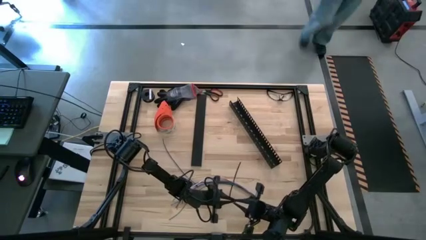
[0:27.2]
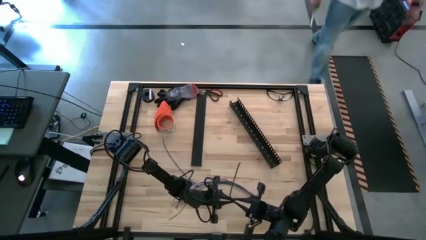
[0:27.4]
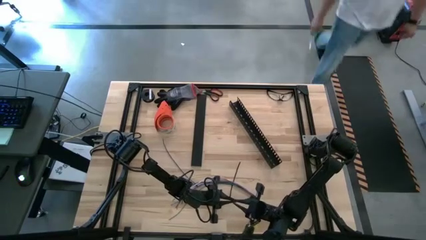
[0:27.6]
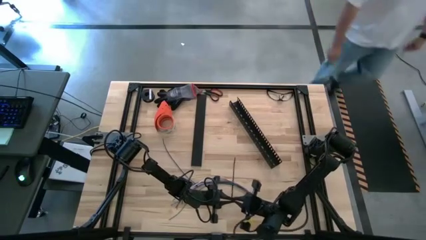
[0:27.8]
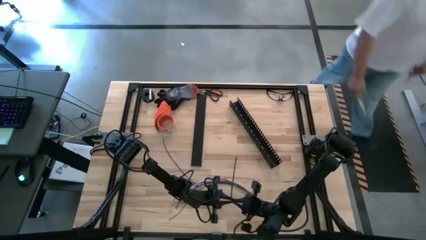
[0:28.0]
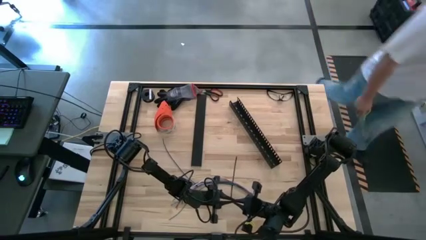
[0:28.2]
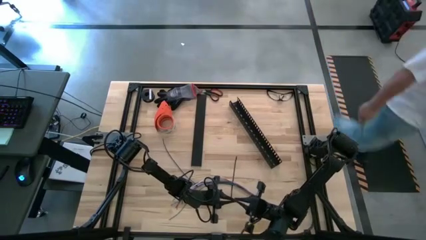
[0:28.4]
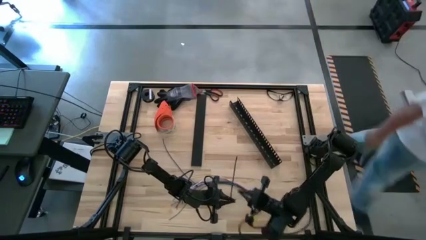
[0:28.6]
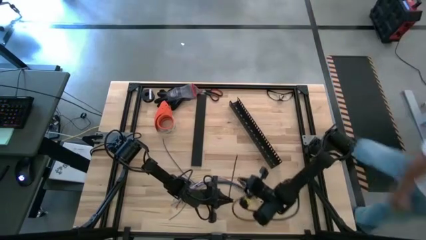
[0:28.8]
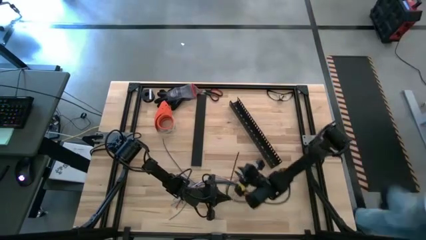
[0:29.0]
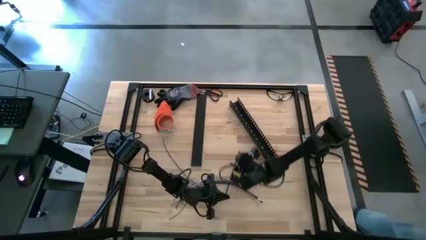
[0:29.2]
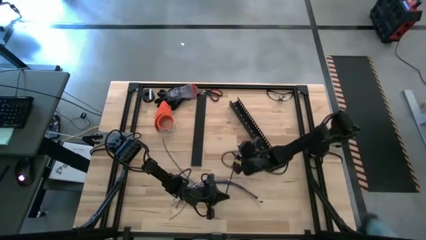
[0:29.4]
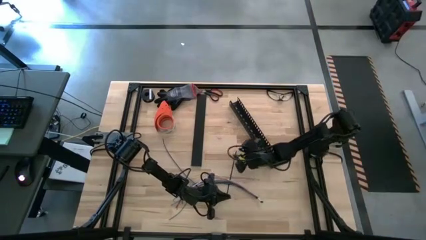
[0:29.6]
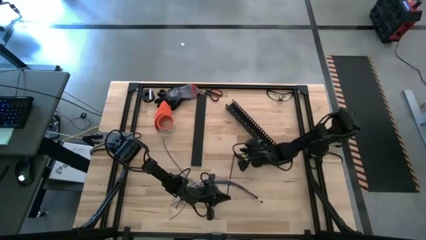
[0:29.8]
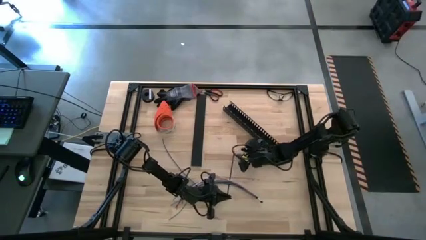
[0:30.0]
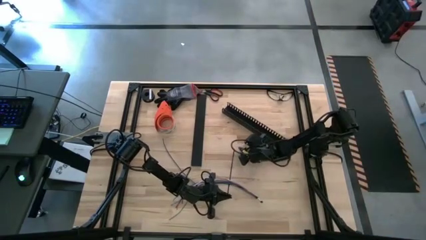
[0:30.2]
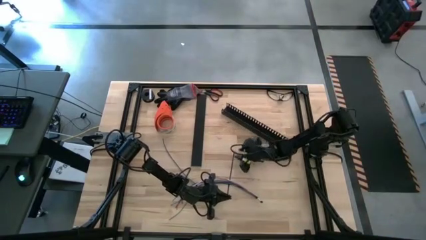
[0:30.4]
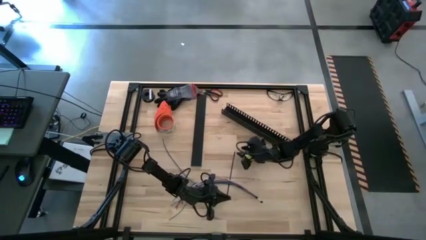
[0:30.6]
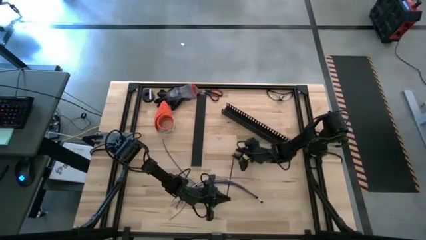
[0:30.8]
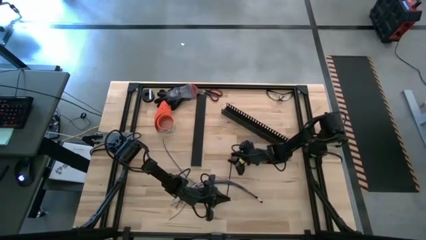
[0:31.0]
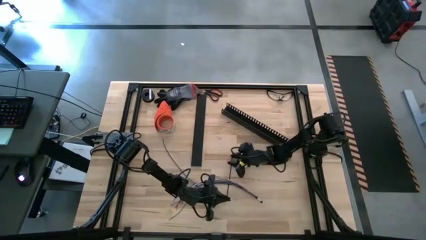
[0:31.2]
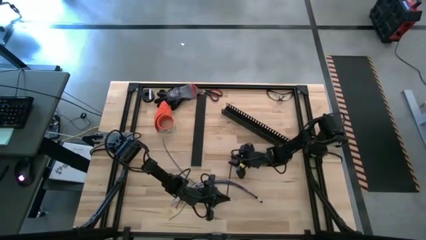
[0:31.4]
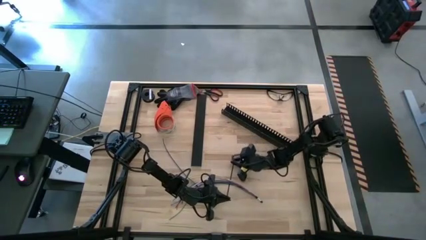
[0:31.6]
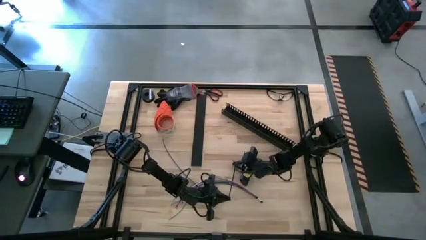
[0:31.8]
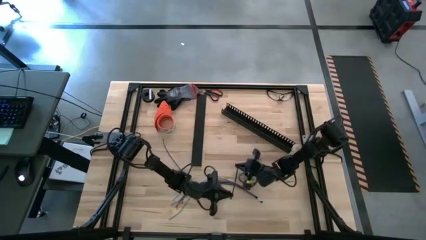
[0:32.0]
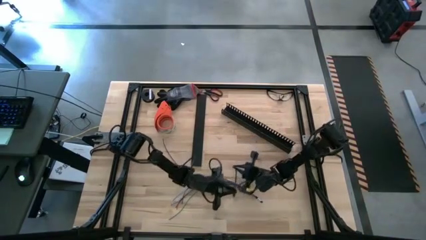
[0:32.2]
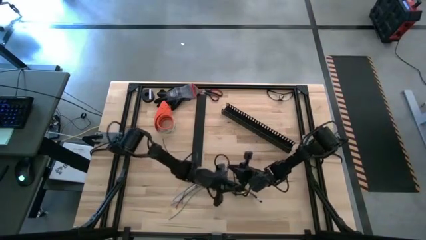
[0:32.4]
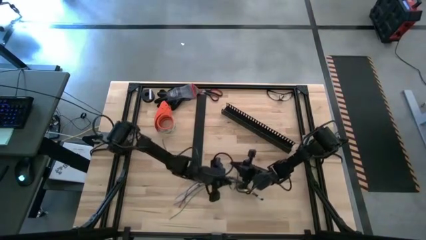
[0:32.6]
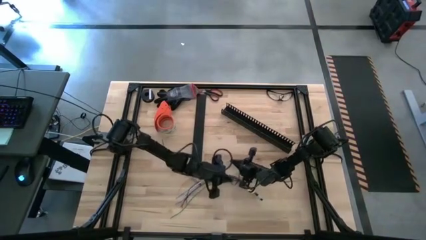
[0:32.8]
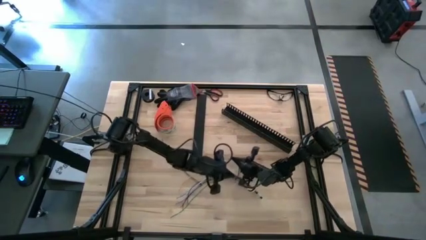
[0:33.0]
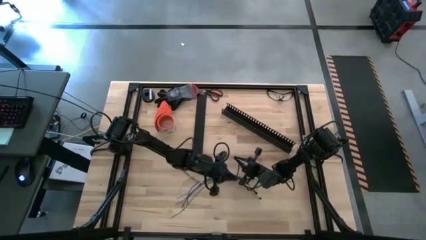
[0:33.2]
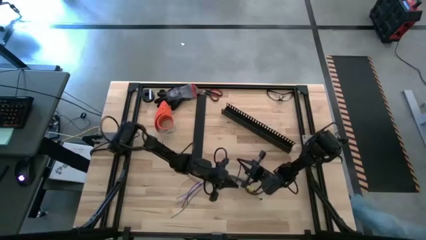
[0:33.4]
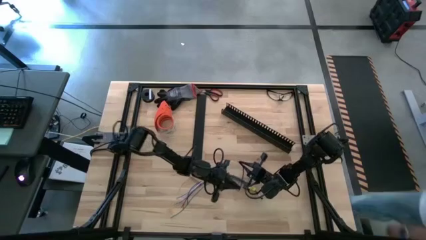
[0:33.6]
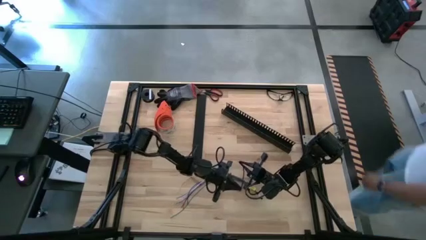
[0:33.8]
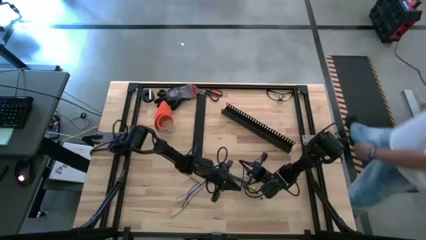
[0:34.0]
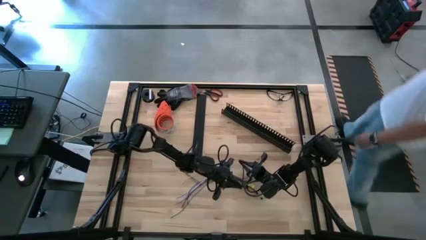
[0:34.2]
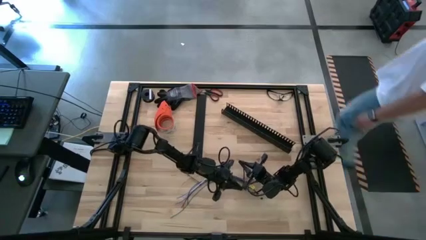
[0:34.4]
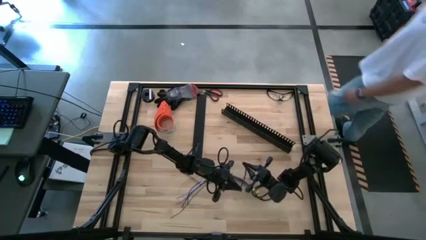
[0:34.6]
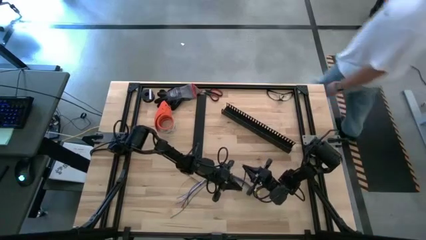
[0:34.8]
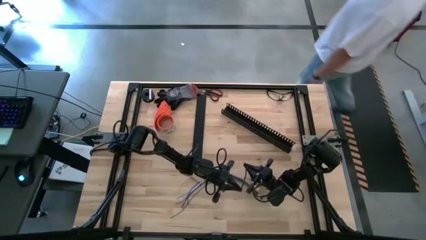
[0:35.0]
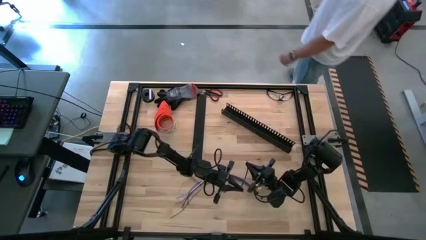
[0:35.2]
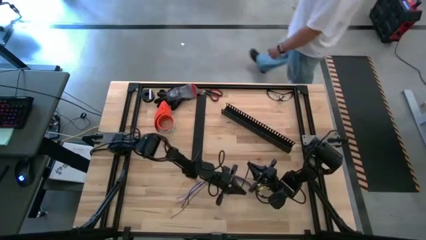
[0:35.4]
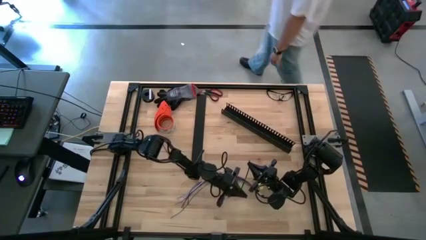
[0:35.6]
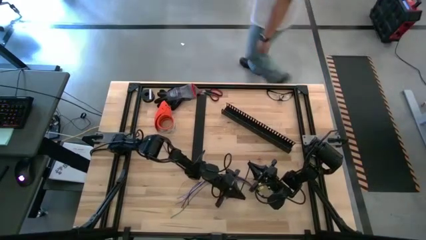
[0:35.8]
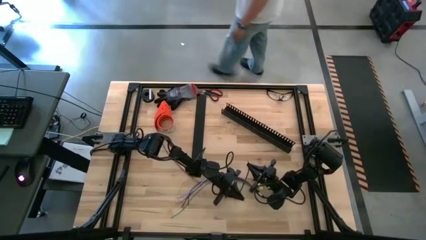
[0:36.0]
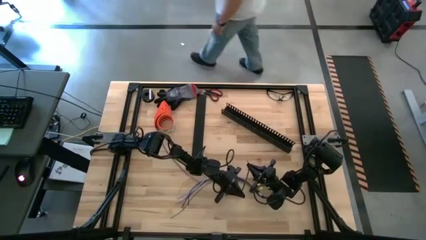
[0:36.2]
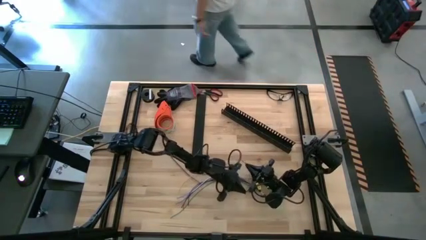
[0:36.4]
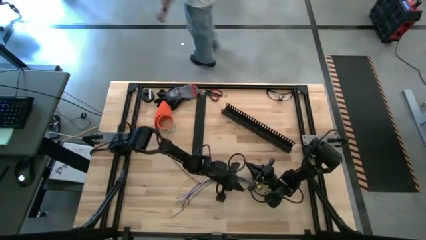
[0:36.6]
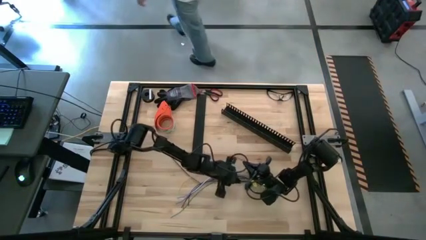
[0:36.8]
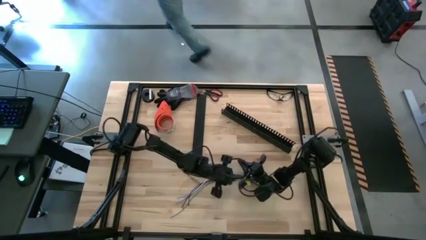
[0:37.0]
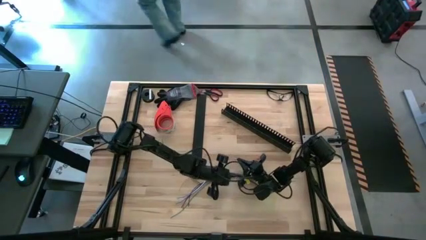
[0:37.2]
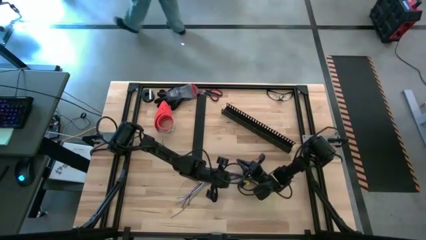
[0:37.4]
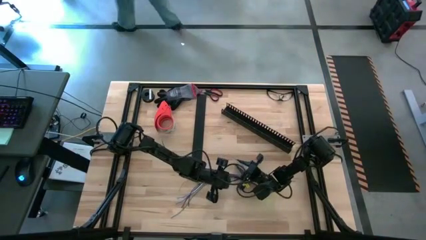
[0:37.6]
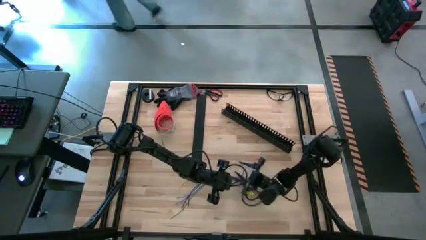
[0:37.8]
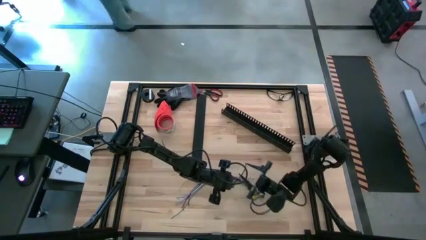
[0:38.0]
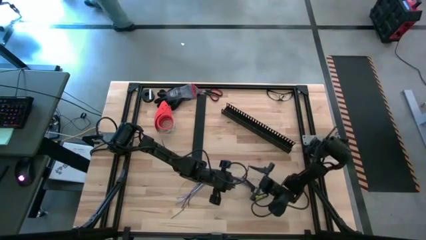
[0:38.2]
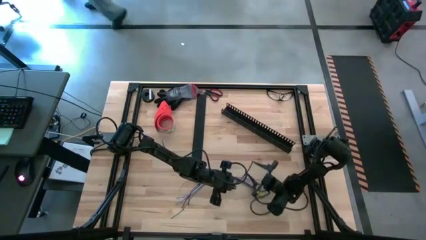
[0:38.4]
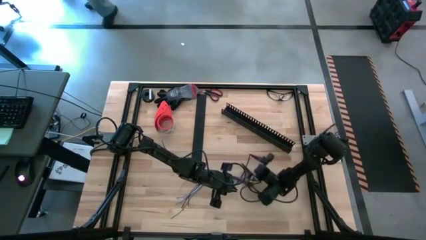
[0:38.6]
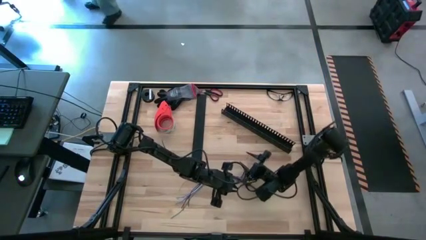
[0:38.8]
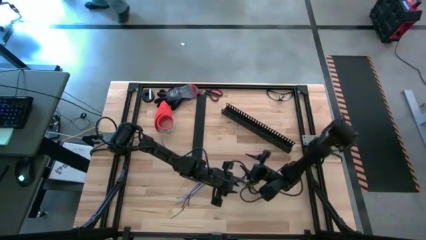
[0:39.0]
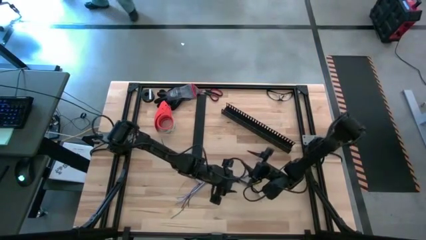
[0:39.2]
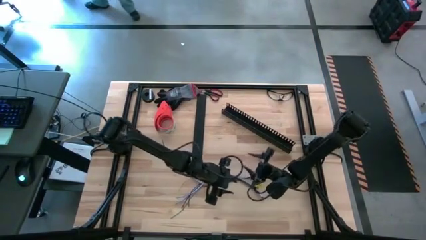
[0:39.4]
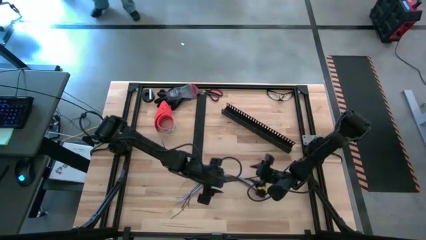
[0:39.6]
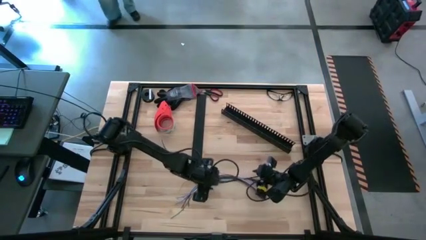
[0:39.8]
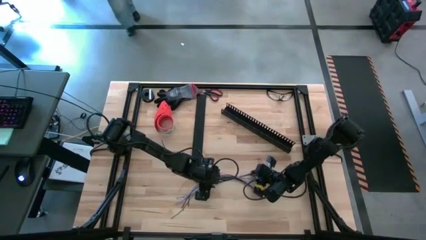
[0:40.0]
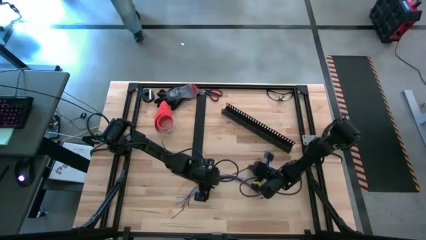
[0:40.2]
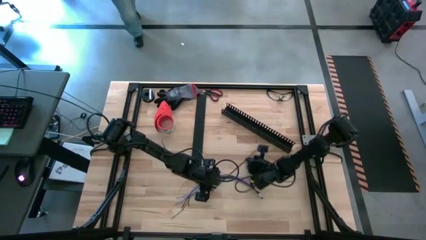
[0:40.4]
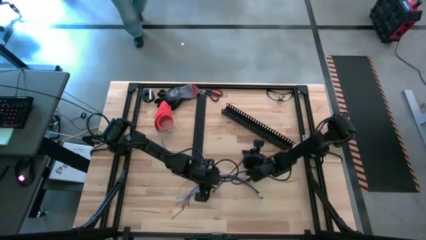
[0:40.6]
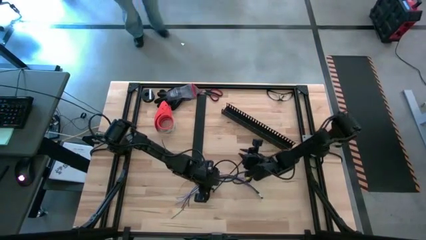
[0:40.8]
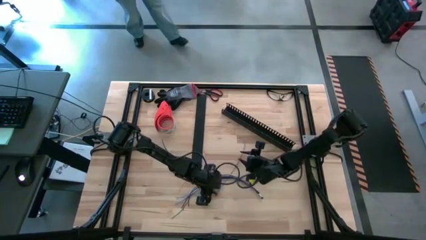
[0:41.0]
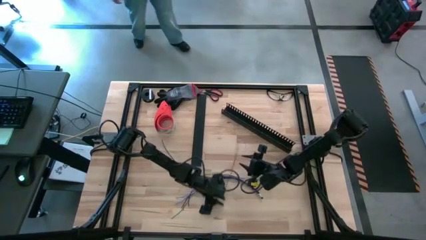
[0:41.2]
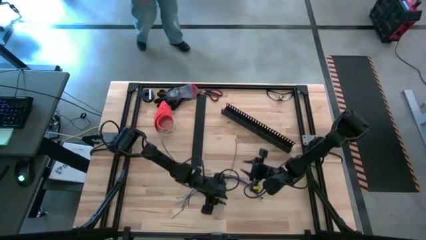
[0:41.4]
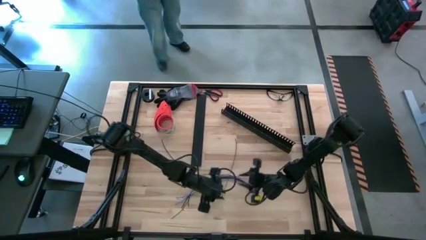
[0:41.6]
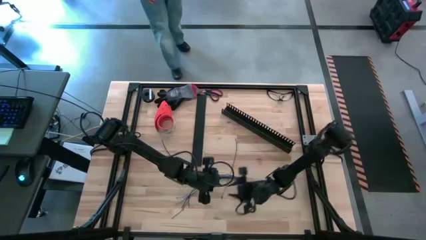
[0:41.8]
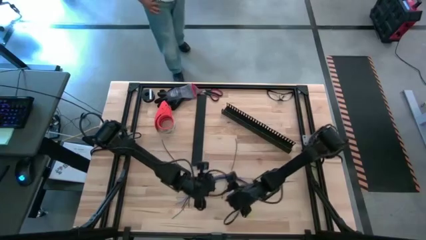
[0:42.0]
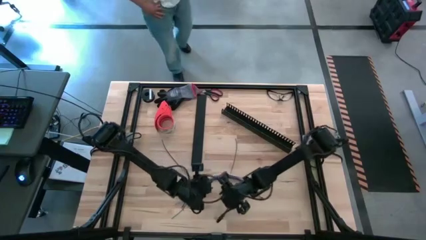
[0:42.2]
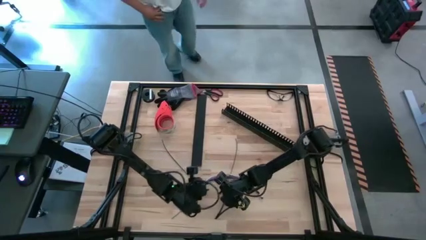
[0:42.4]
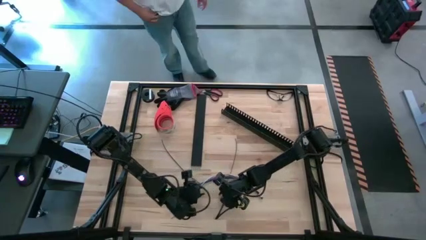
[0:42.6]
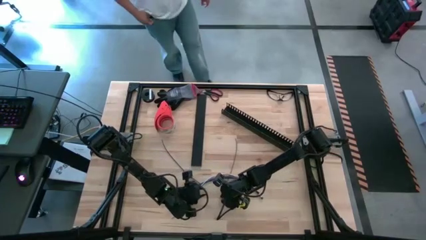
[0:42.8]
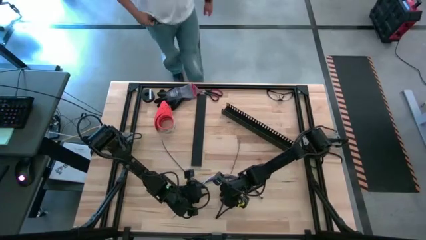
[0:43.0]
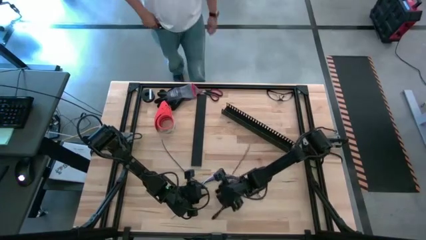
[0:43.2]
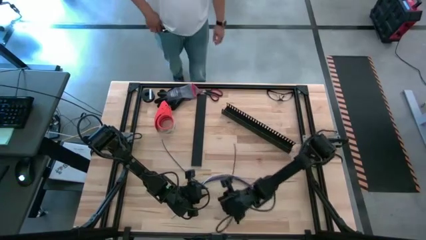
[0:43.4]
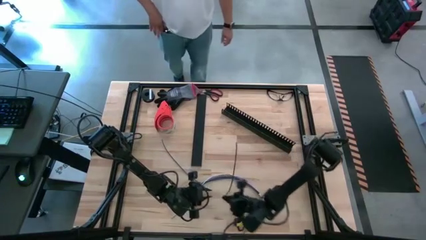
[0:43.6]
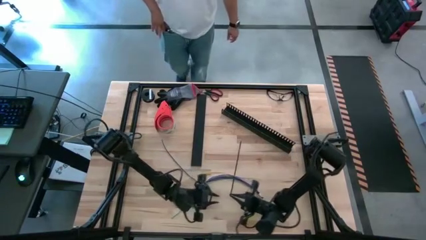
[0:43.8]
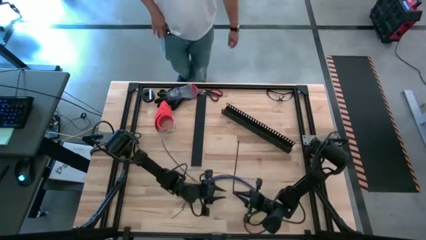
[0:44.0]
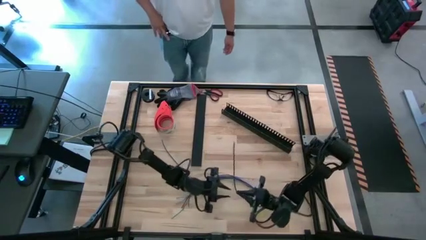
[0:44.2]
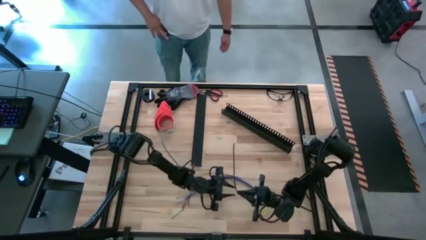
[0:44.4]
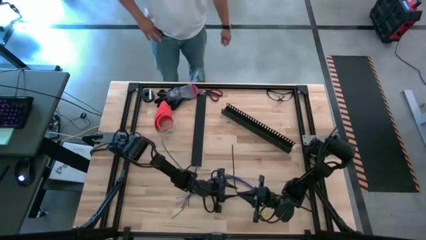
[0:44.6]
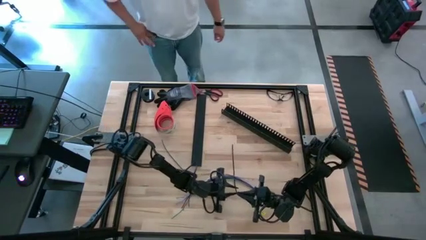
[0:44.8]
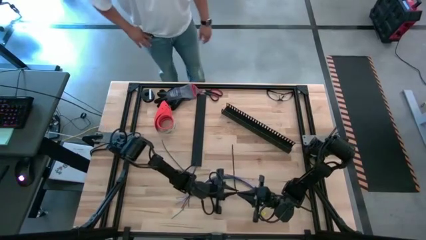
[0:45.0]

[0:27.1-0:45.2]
Task: Ziptie cables
Wrap the black zip tie on the cables
